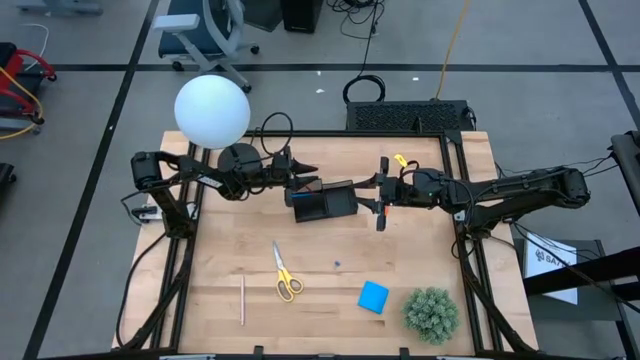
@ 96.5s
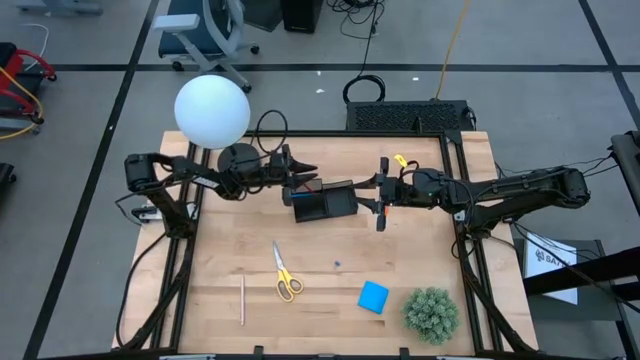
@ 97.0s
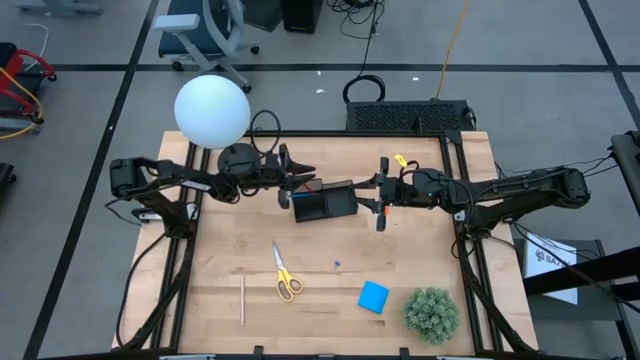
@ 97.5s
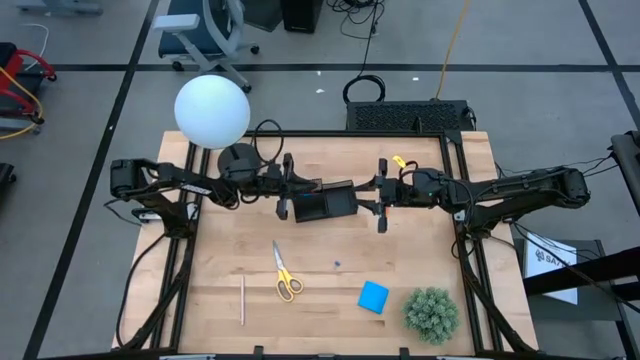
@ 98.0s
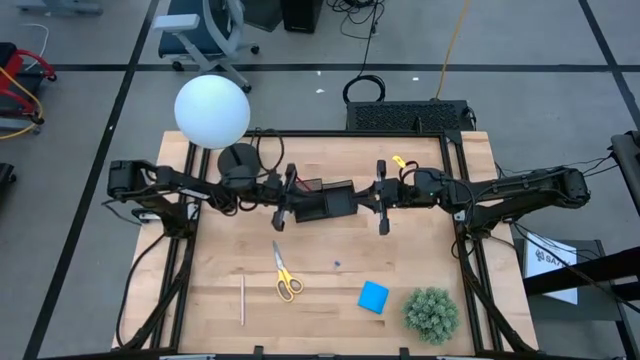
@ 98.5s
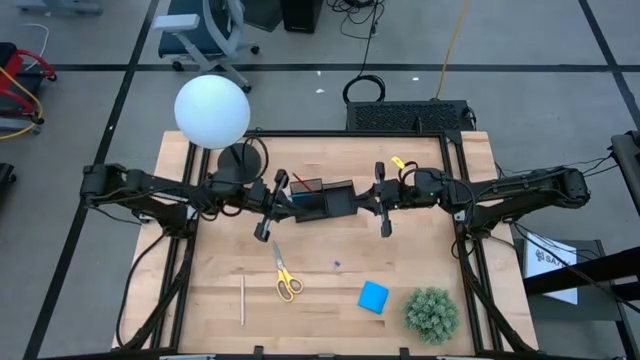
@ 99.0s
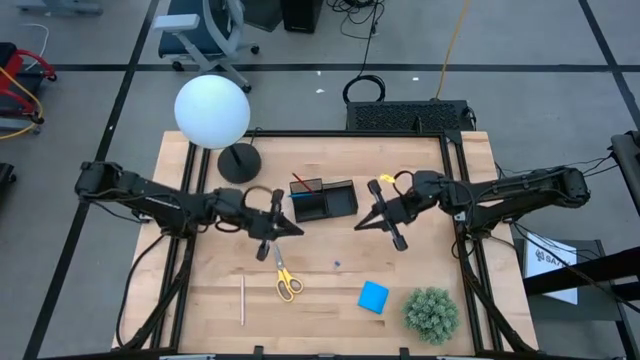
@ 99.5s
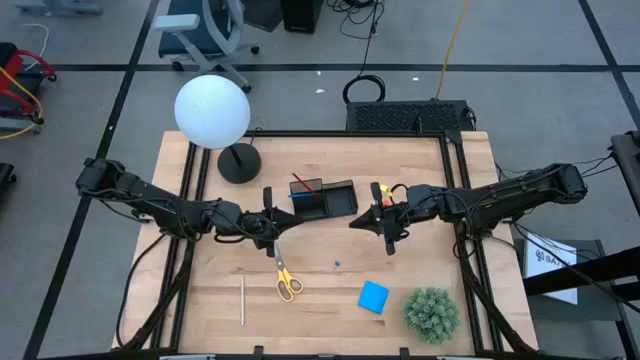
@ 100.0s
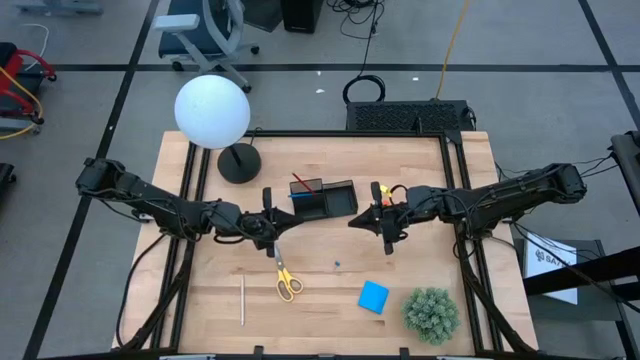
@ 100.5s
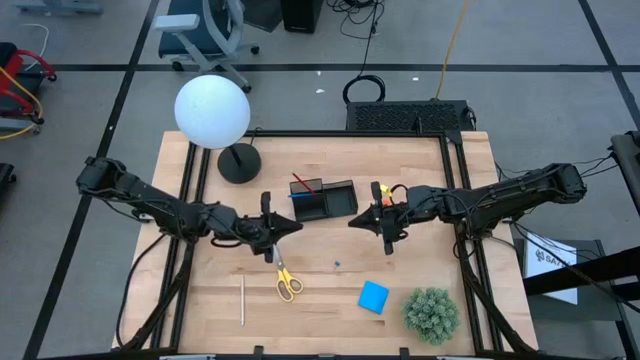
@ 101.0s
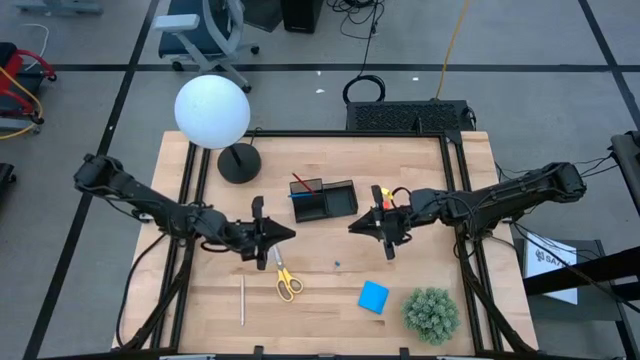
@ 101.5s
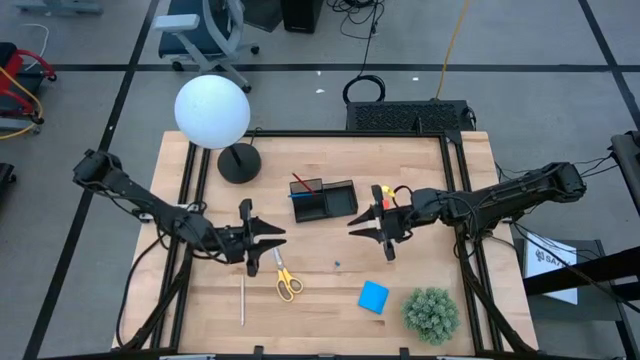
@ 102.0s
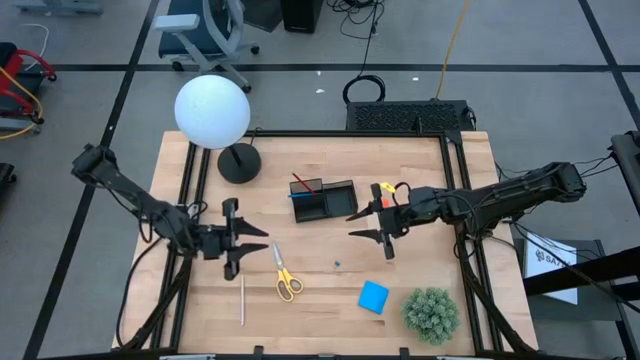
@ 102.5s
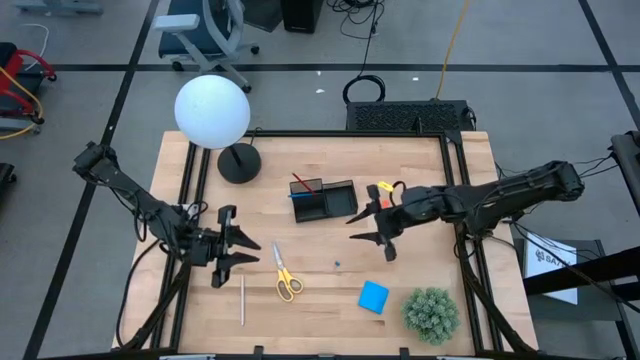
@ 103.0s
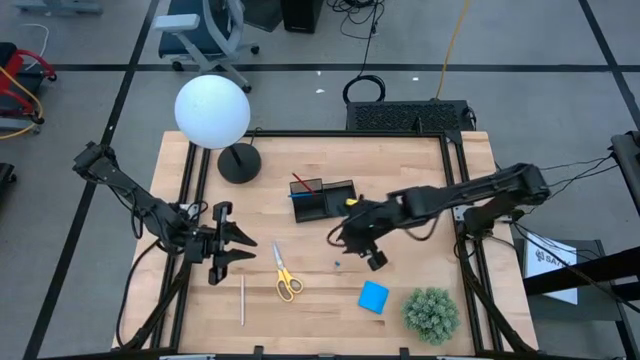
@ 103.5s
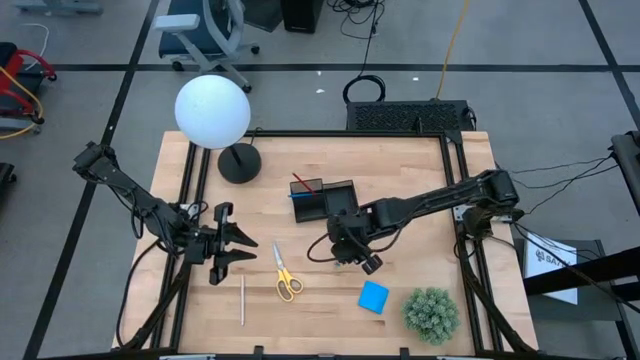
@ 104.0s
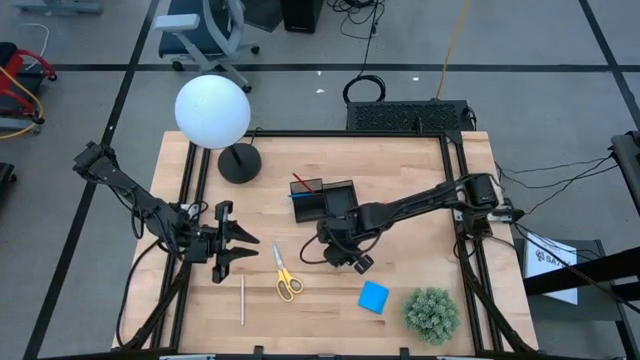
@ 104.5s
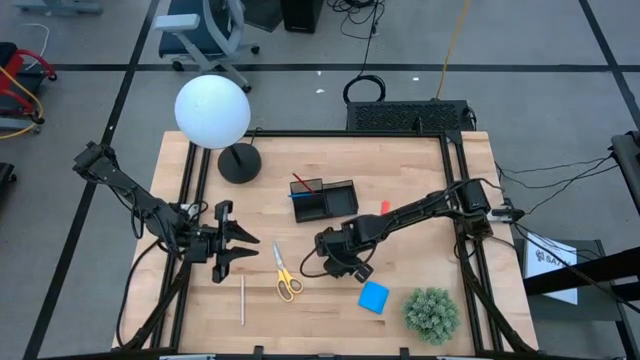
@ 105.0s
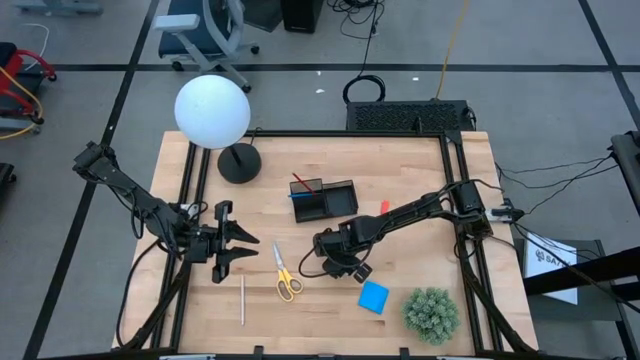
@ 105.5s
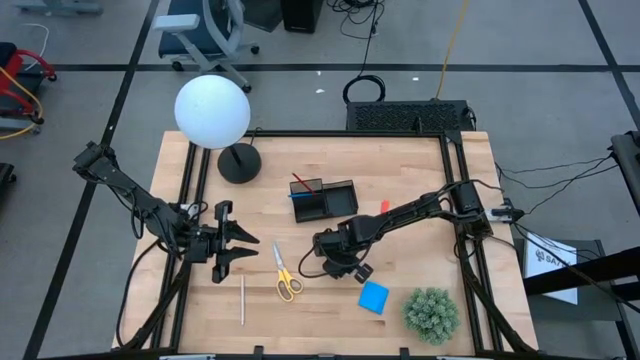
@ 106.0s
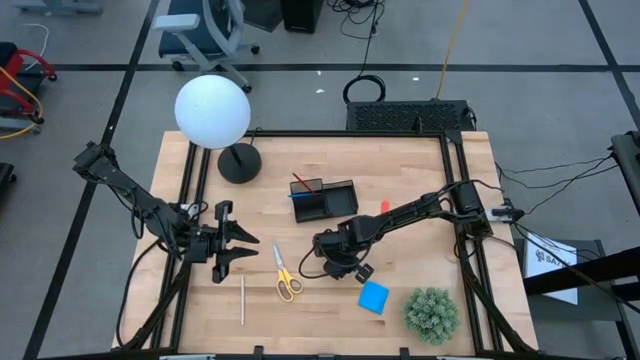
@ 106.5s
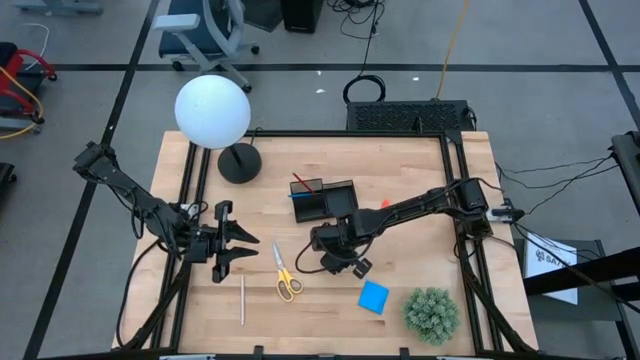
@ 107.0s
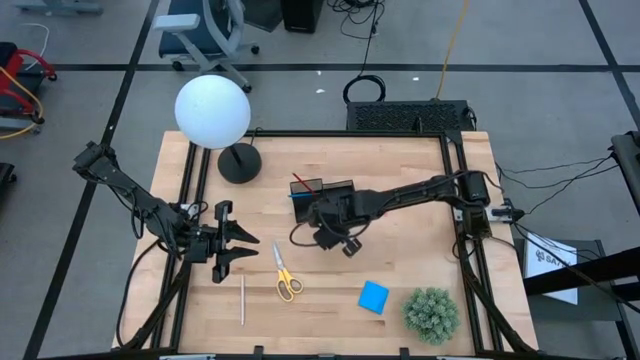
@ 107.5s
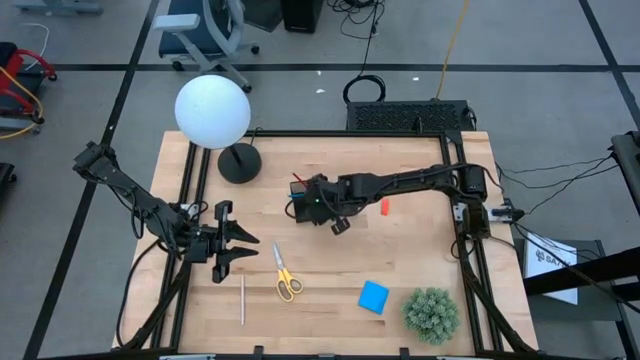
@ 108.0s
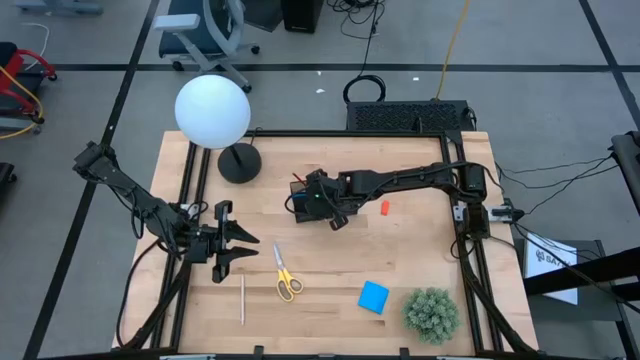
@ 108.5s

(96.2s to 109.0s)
Task: Pick and place office supplies into organizer
Put the blue binder clip into the desk organizer

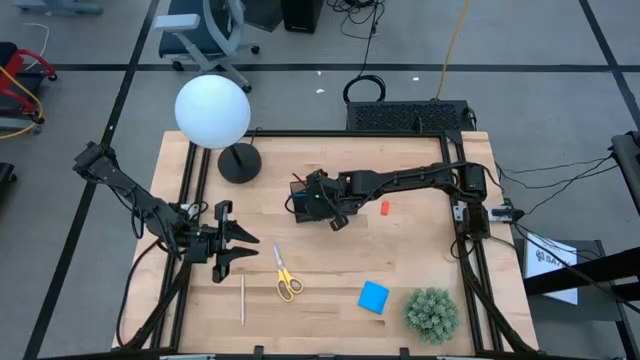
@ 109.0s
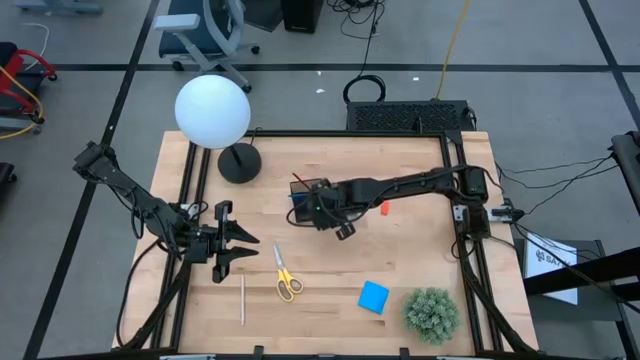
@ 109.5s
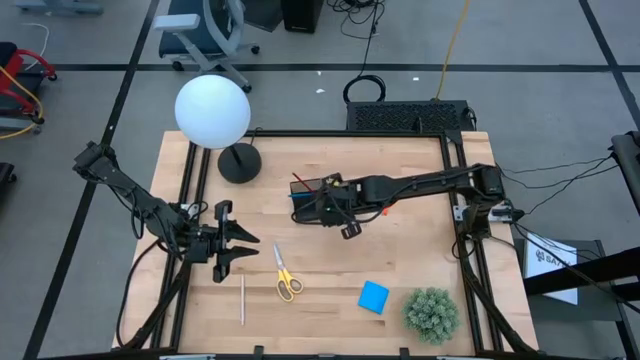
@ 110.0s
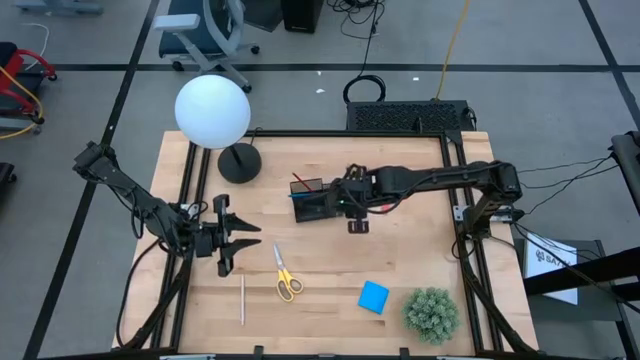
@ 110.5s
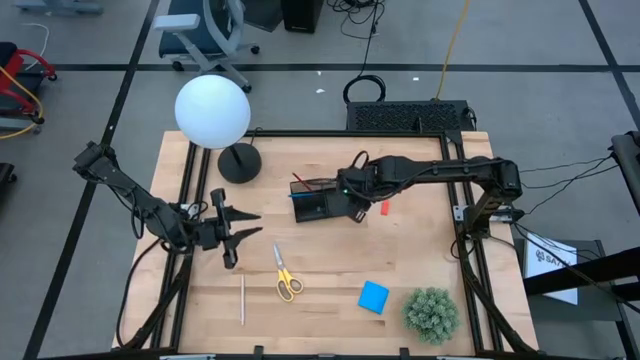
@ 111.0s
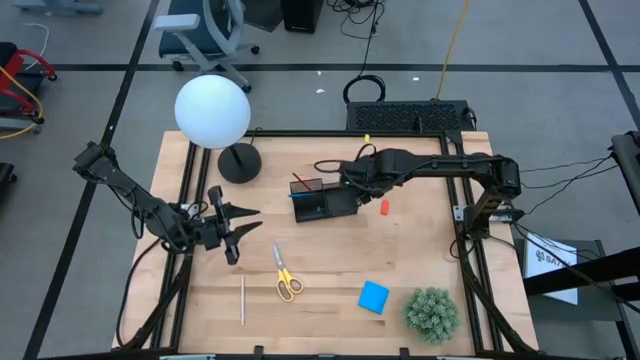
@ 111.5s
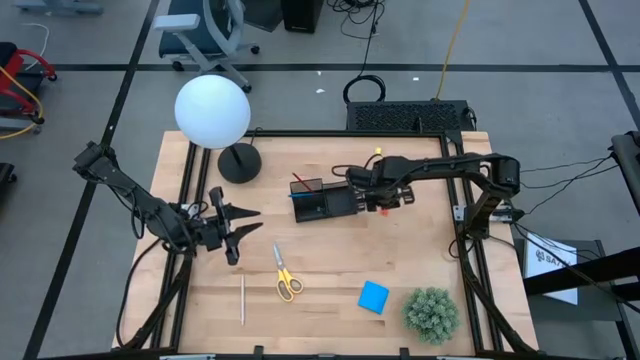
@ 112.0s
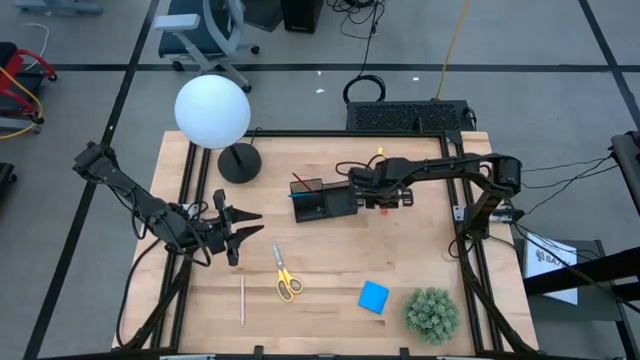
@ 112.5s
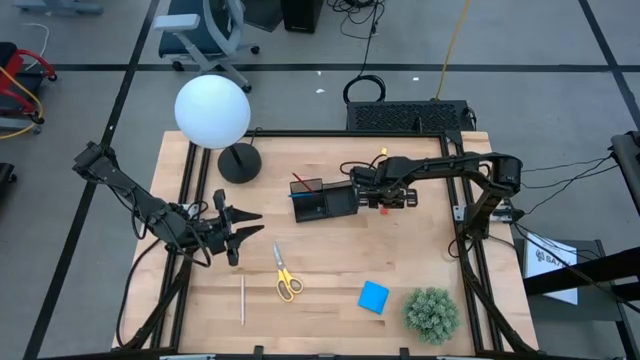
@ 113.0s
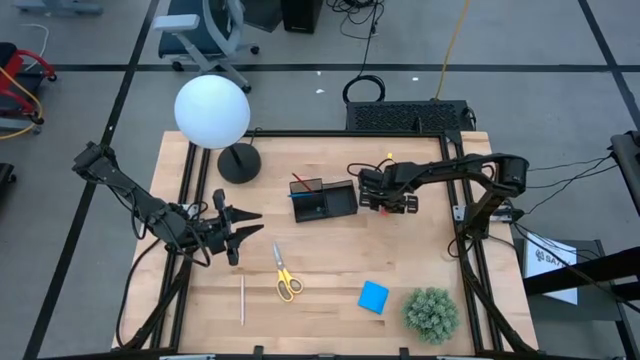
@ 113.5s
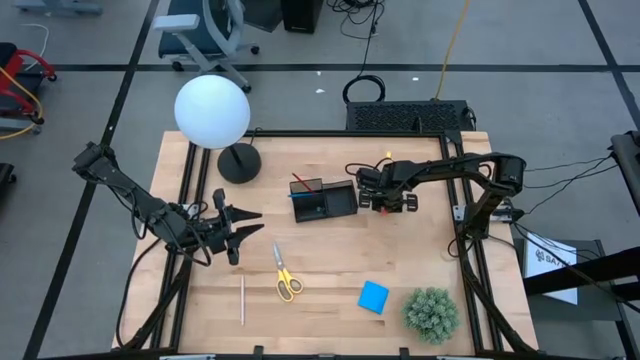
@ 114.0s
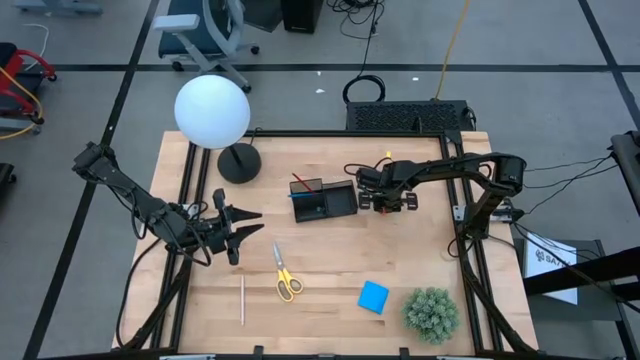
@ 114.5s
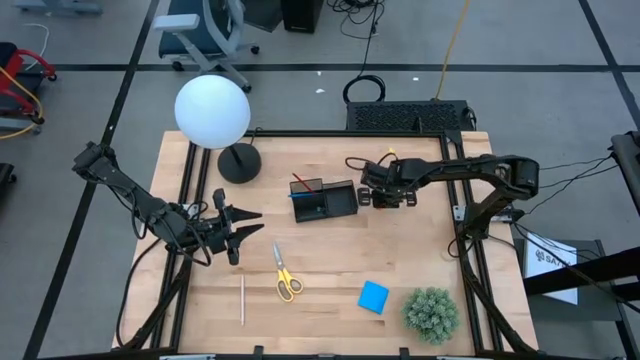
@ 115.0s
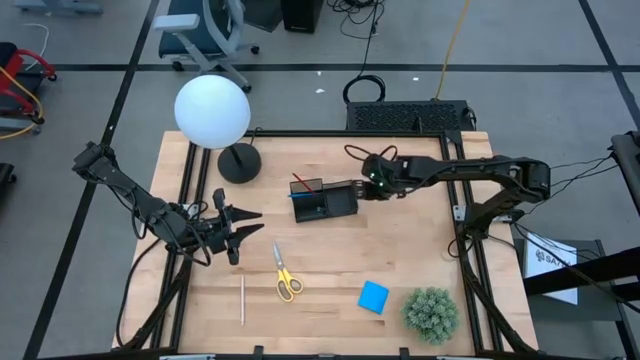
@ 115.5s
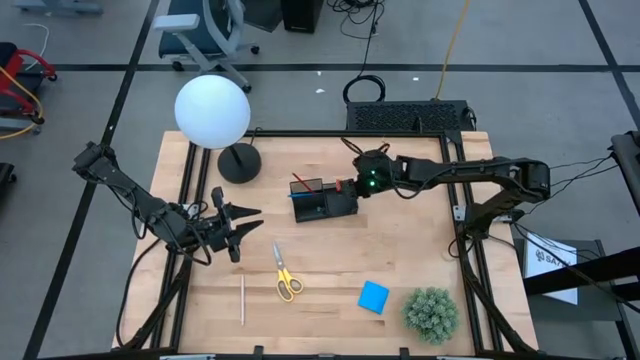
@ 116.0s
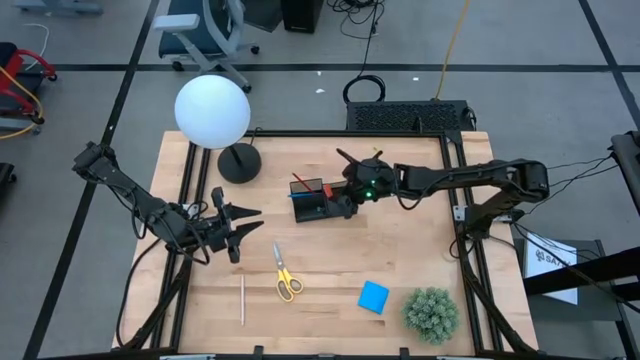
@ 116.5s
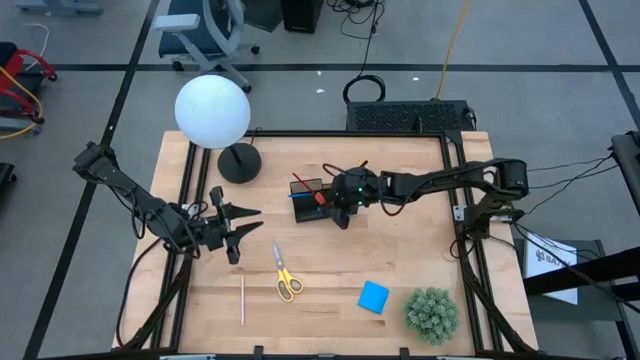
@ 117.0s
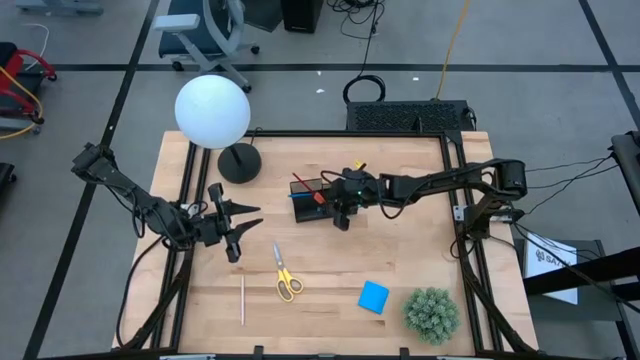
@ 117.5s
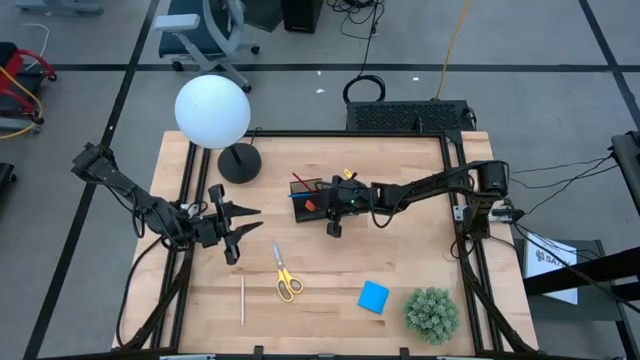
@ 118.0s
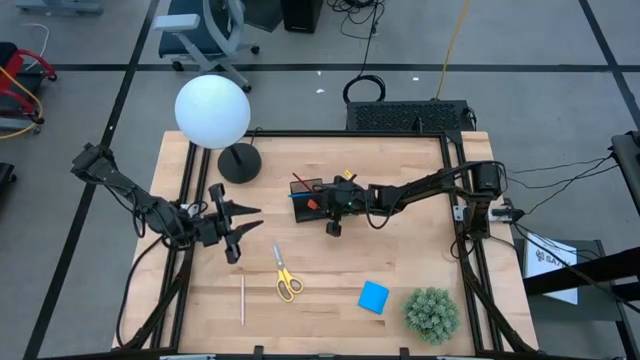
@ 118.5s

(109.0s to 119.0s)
Put the orange eraser into the desk organizer
